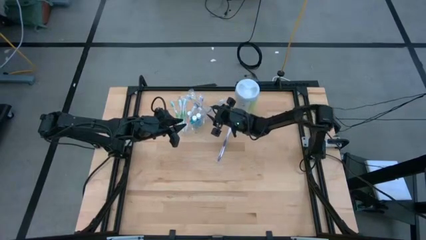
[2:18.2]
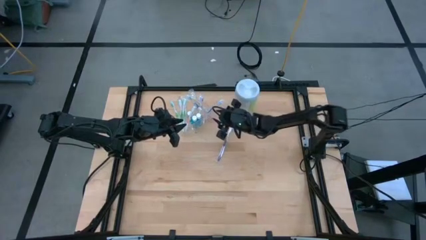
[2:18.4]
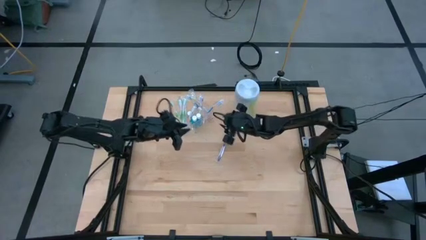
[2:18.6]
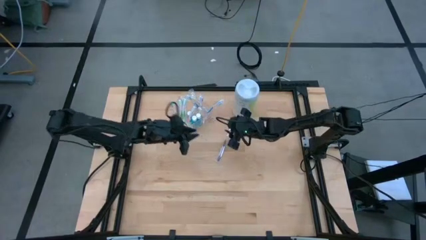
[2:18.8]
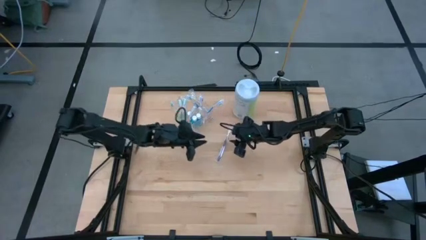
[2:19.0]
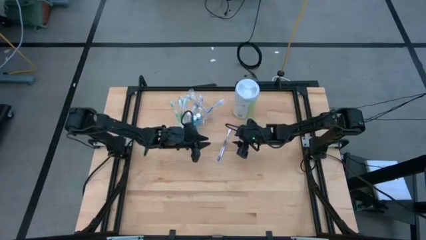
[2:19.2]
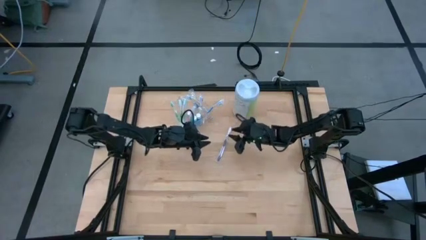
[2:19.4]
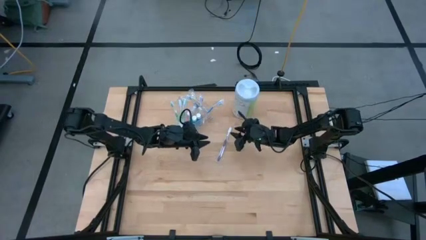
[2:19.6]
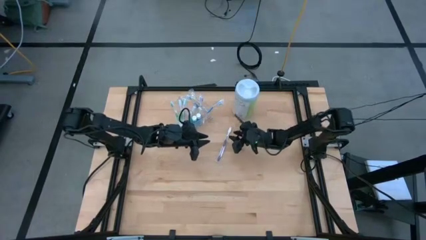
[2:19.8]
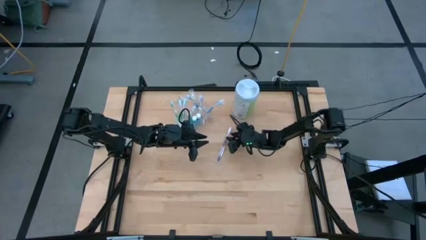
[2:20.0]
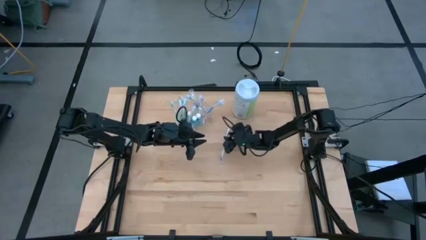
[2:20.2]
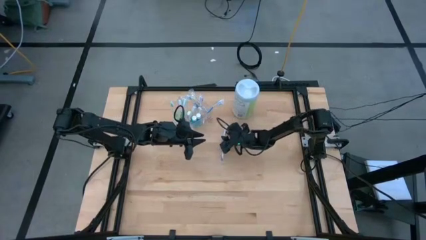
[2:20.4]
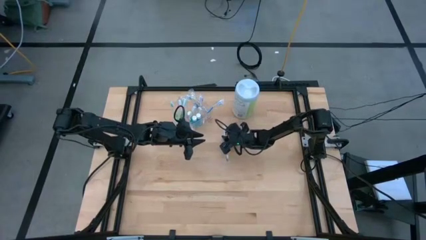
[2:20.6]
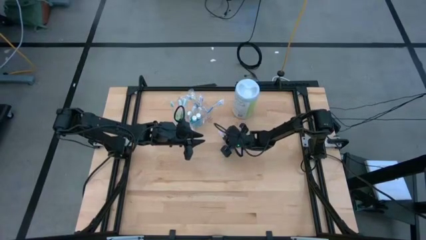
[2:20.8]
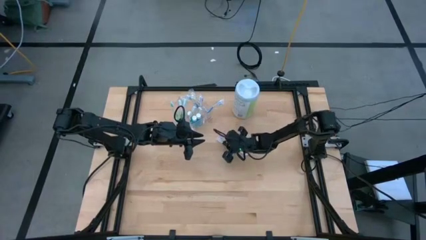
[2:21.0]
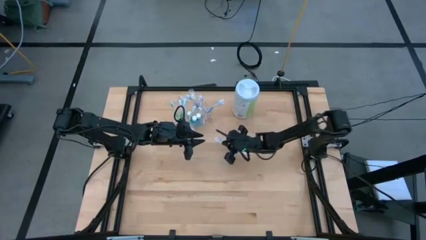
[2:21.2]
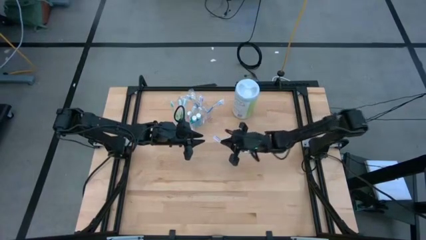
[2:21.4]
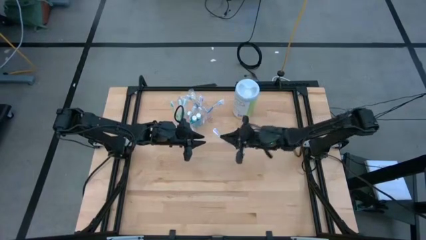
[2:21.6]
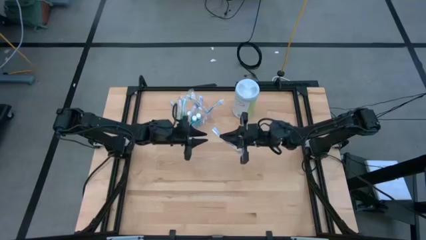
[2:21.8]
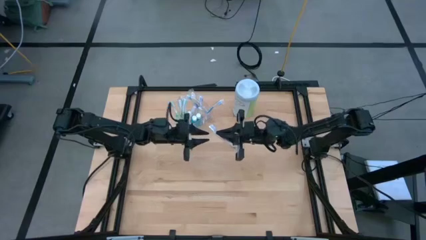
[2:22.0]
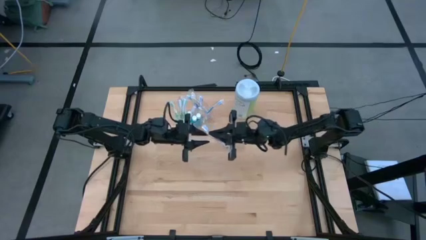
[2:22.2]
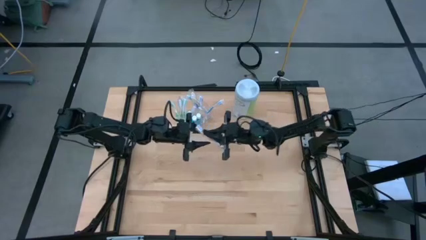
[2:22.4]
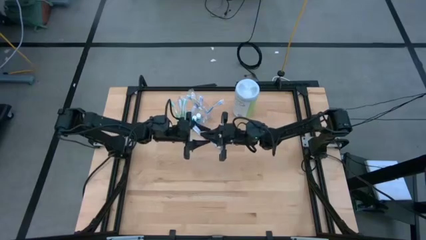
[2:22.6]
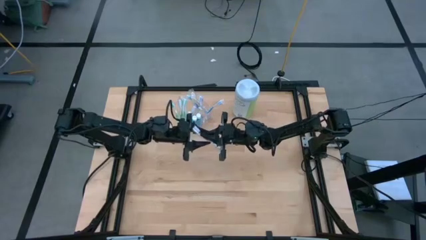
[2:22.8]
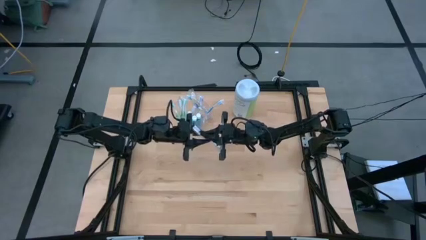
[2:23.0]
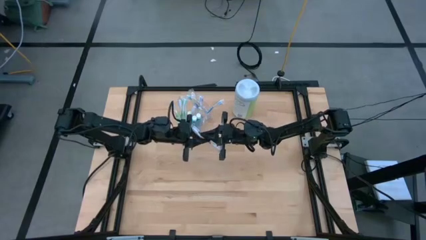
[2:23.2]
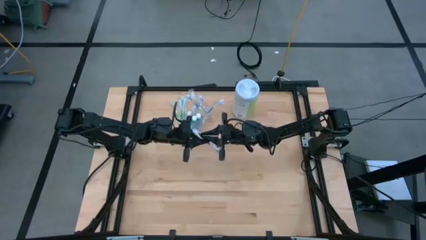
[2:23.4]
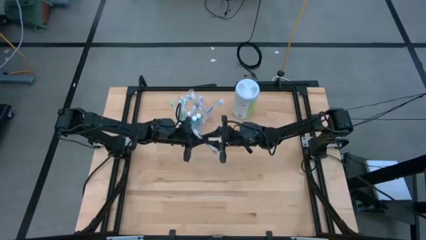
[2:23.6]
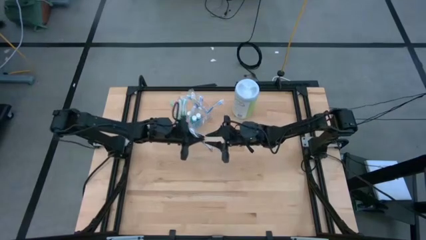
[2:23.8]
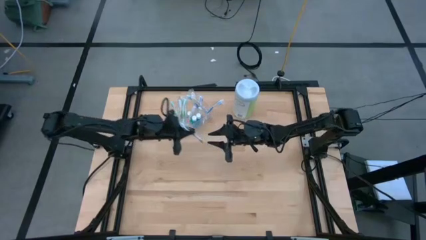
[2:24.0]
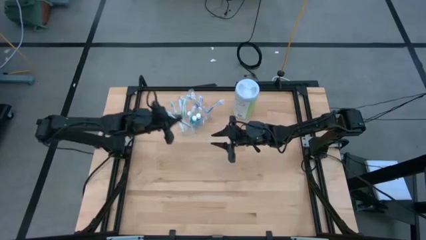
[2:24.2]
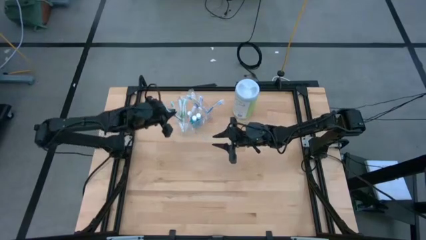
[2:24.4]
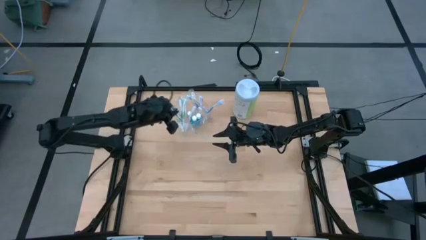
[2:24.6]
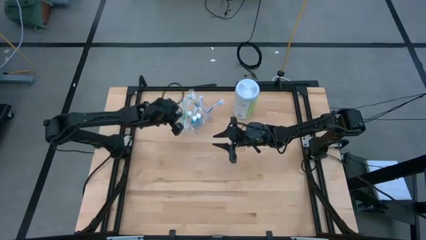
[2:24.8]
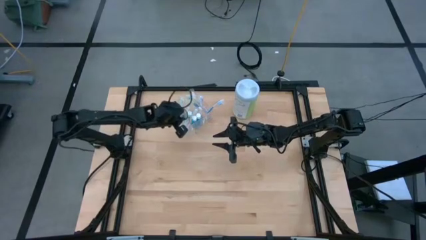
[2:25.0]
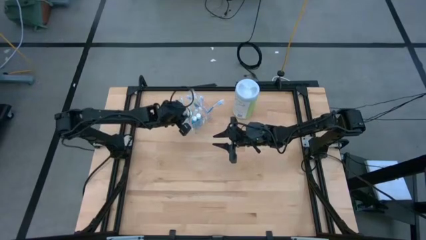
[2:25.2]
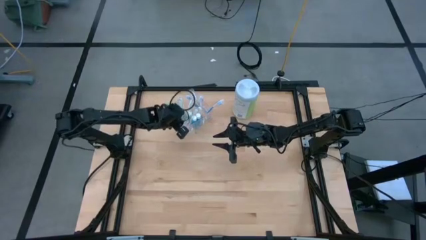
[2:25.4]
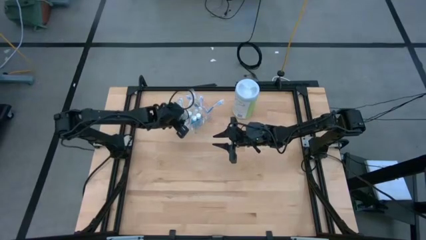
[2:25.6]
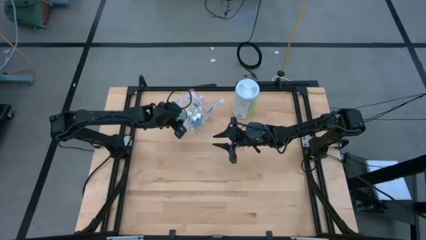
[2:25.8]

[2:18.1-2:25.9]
Task: Pick & Place toothbrushing station
Put the purple toothbrush into the transparent organizer

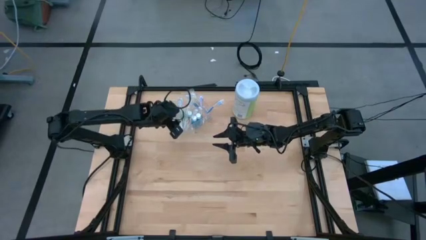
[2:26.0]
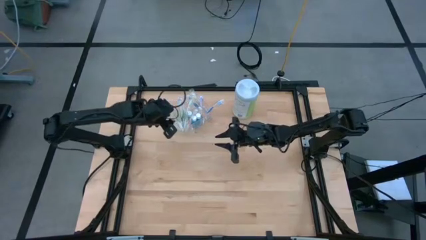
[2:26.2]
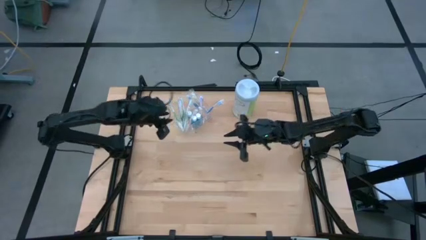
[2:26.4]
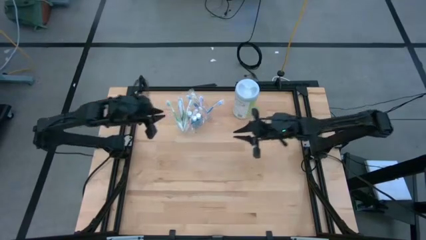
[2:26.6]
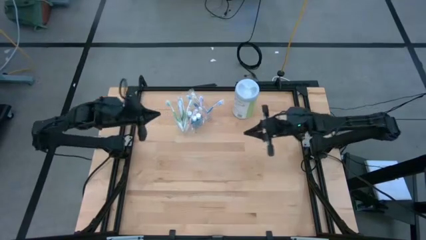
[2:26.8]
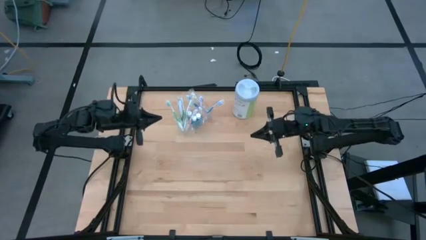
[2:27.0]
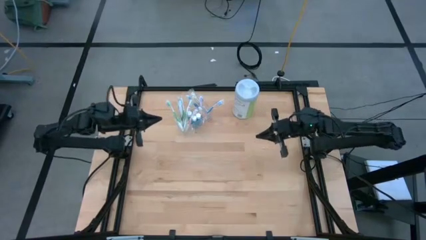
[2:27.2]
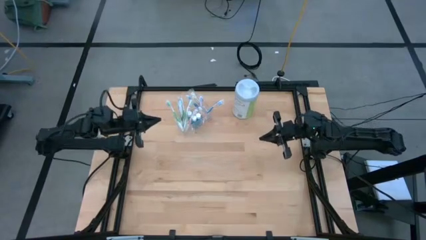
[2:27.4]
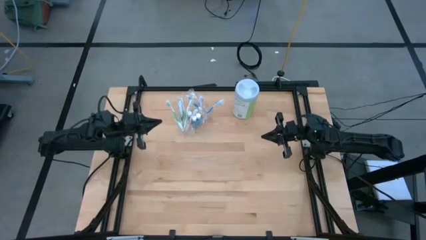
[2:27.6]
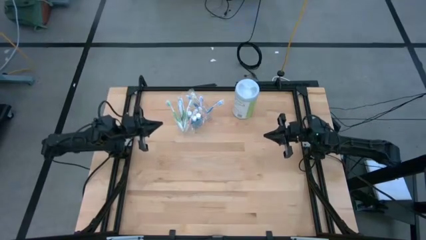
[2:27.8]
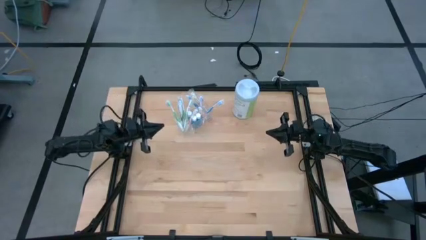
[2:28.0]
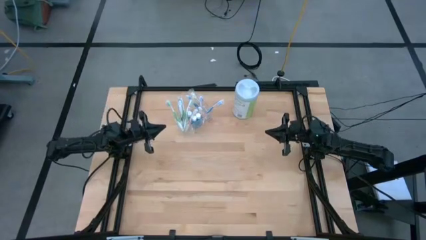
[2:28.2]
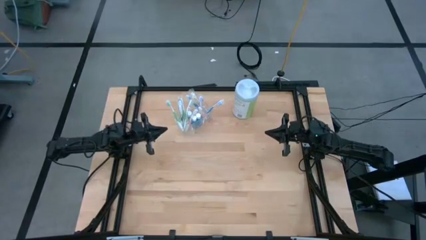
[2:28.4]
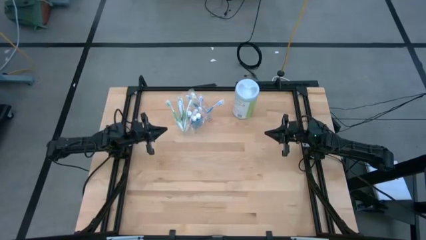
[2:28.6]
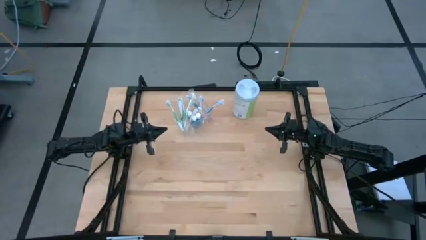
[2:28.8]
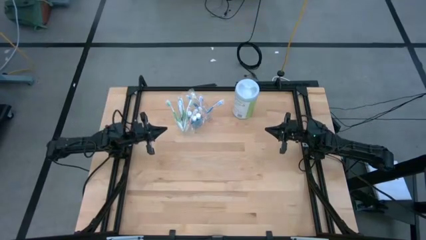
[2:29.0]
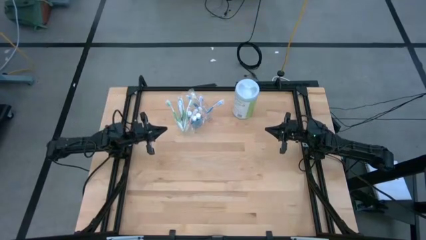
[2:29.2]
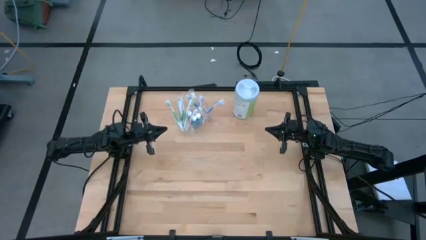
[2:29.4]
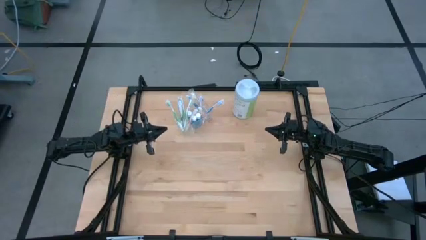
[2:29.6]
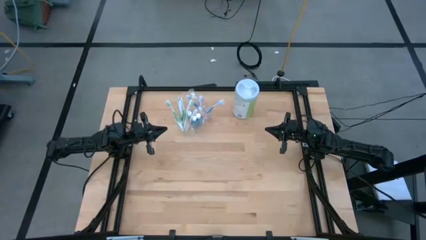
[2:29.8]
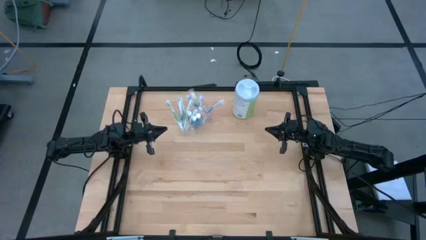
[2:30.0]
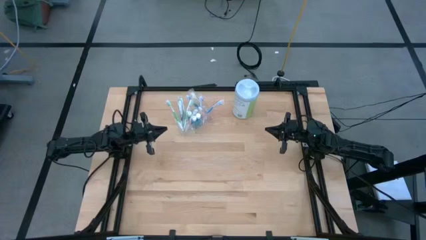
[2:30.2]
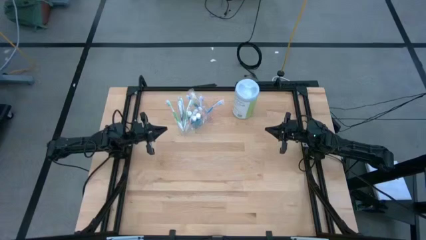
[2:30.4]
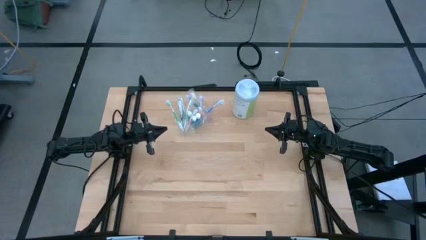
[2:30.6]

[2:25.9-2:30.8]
Return to Home Position

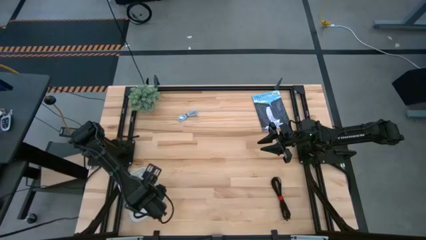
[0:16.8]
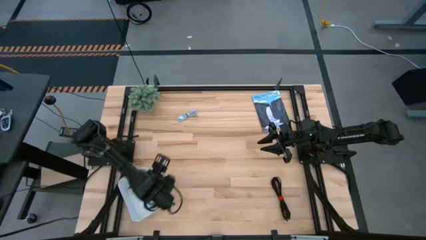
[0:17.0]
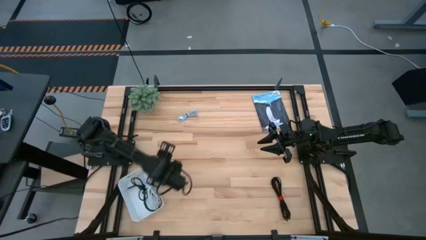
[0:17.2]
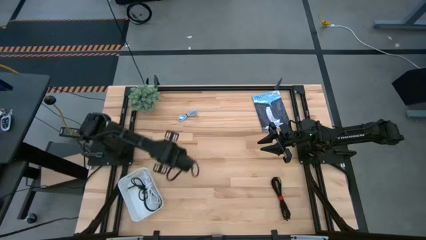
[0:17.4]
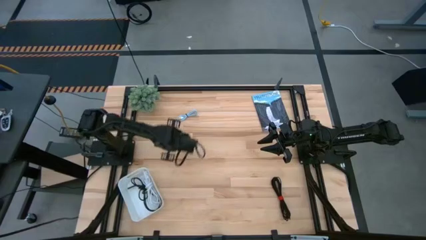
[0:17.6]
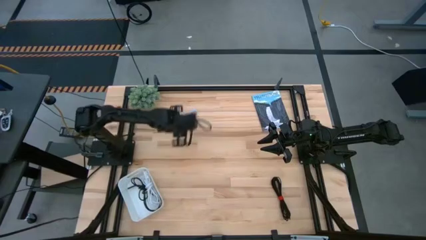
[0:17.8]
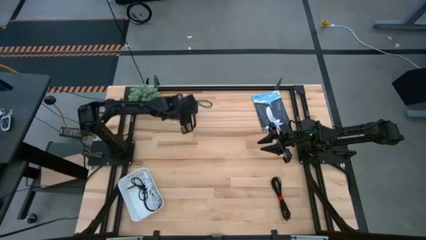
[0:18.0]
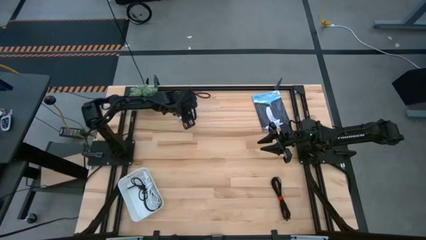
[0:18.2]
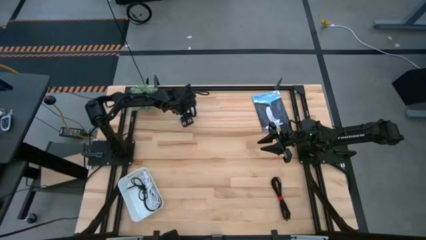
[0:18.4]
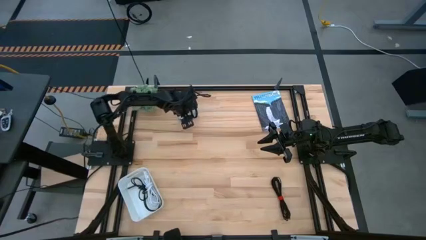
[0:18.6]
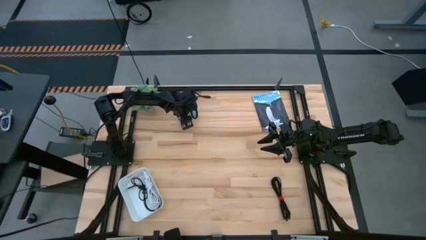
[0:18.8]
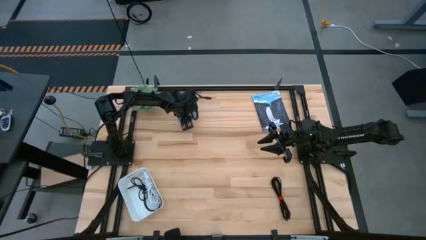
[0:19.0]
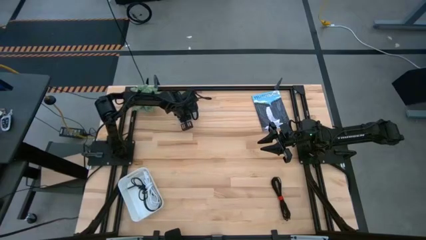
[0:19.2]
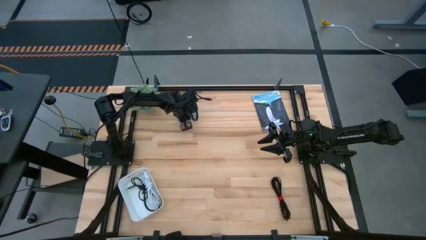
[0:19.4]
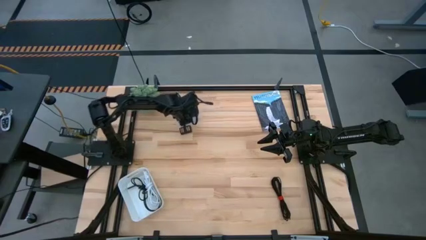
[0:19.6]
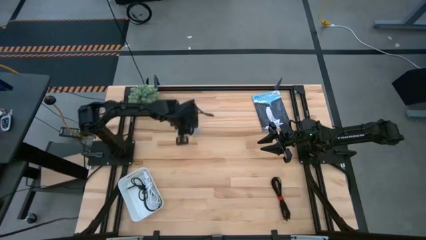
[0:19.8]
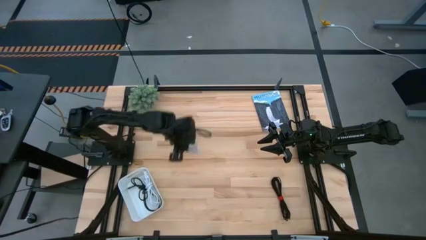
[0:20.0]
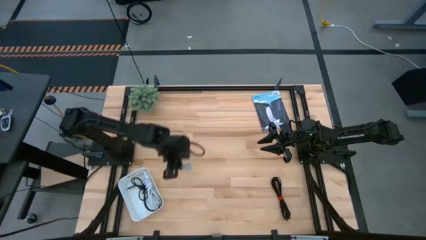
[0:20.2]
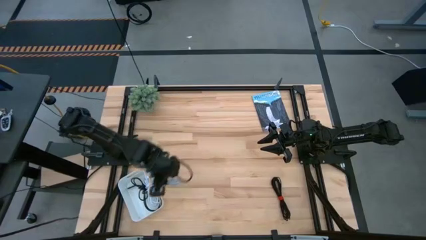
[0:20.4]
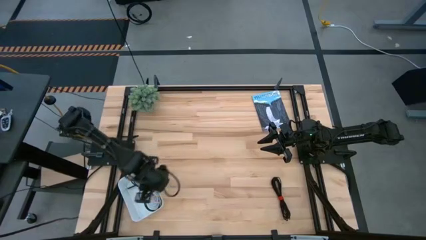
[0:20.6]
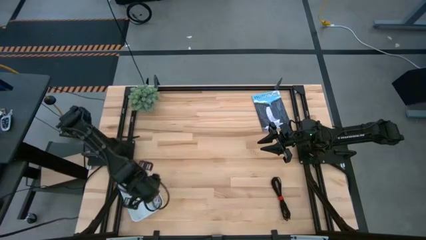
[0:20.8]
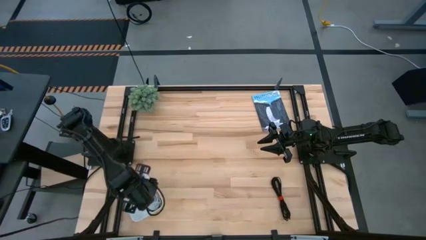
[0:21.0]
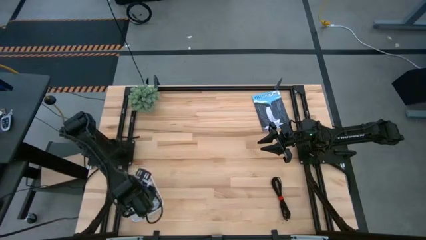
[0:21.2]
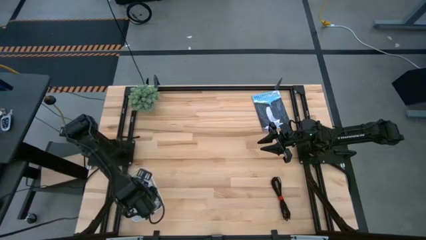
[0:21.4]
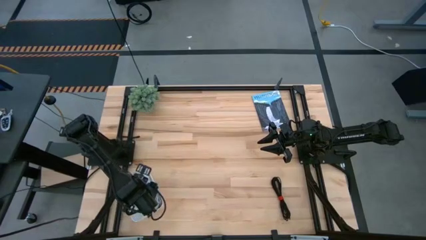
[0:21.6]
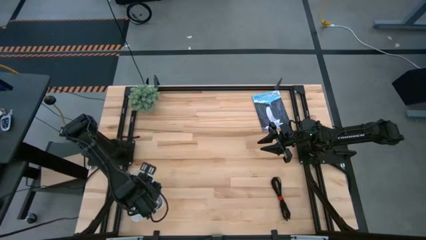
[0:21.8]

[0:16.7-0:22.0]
Task: Pick and place USB-C Cables
Put the gray usb cable into the white bin
